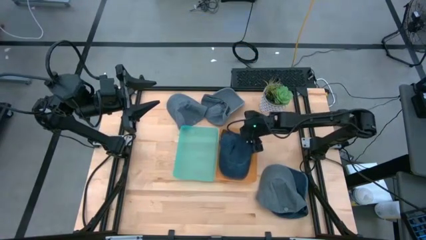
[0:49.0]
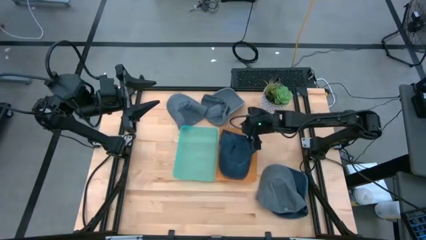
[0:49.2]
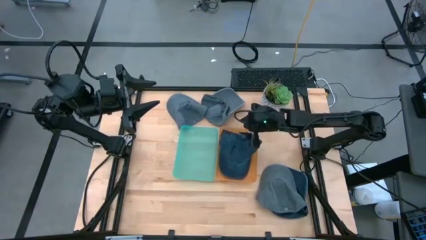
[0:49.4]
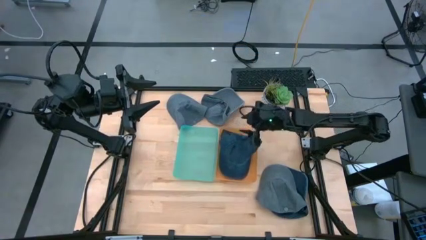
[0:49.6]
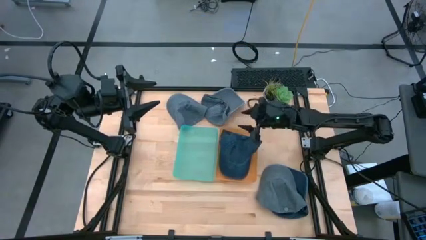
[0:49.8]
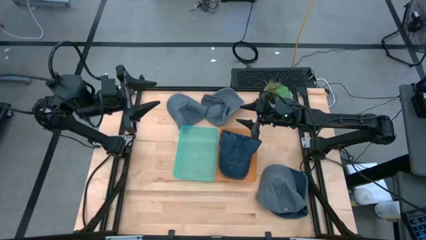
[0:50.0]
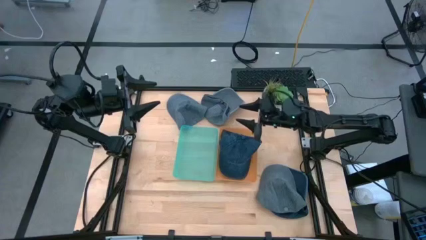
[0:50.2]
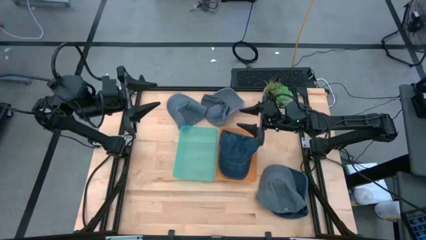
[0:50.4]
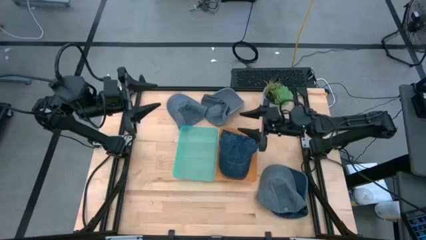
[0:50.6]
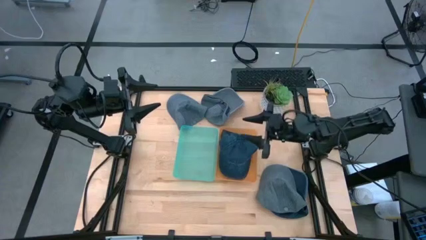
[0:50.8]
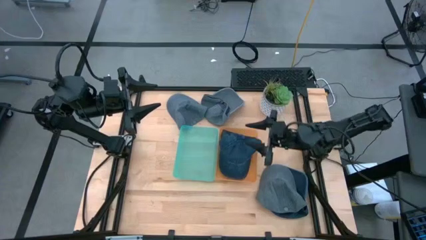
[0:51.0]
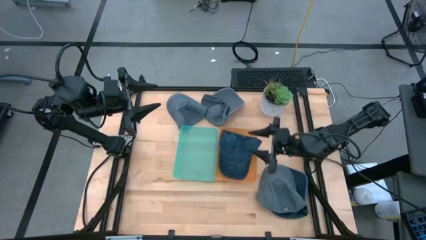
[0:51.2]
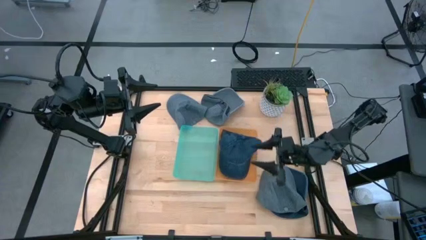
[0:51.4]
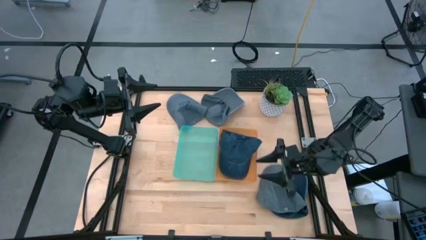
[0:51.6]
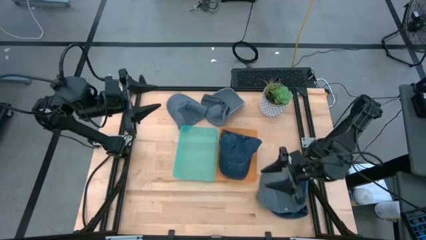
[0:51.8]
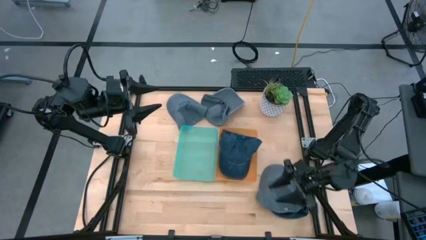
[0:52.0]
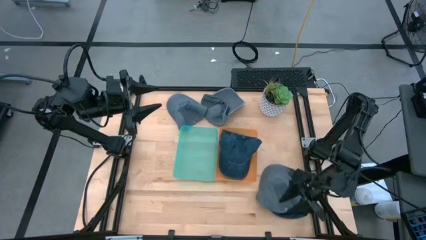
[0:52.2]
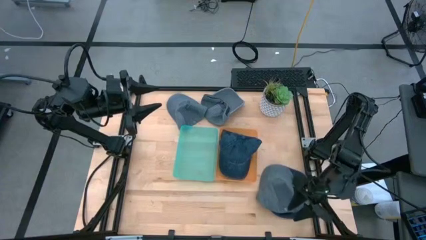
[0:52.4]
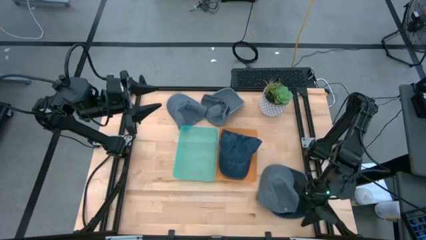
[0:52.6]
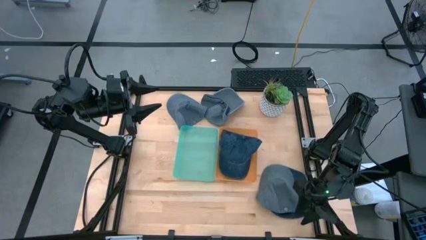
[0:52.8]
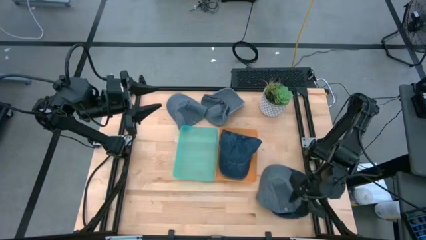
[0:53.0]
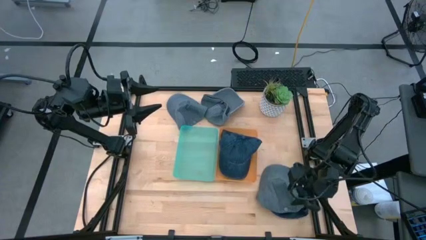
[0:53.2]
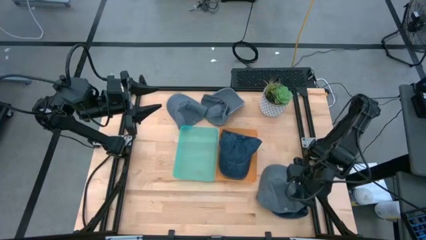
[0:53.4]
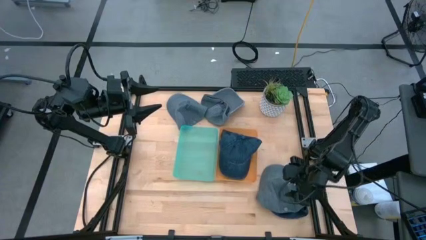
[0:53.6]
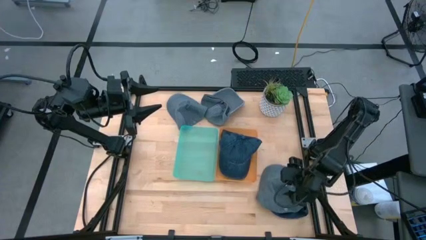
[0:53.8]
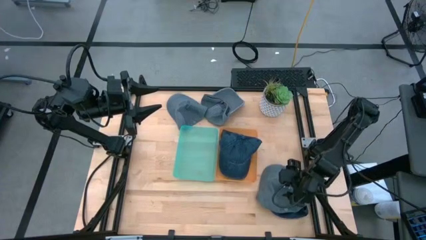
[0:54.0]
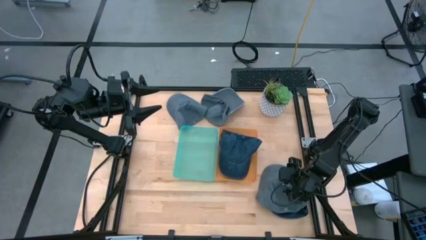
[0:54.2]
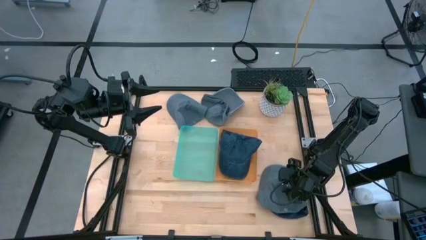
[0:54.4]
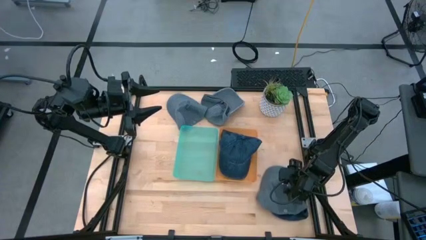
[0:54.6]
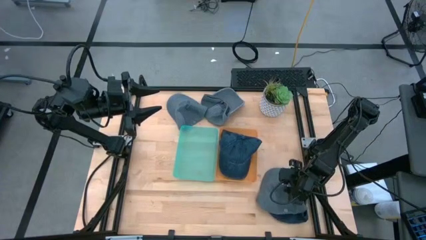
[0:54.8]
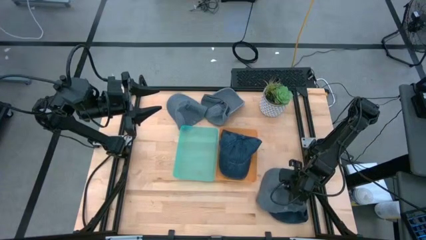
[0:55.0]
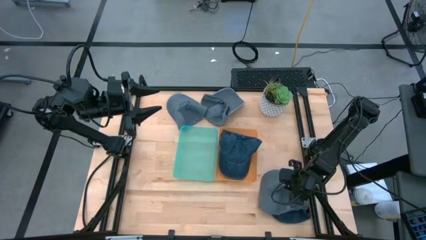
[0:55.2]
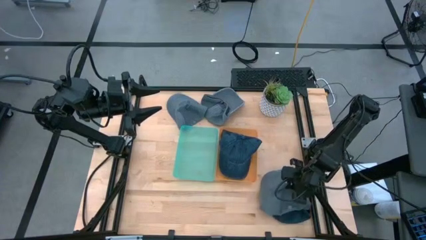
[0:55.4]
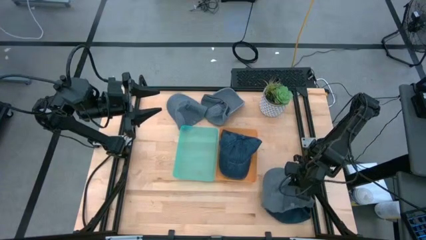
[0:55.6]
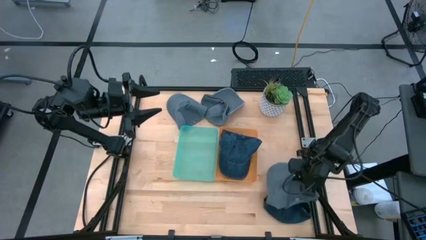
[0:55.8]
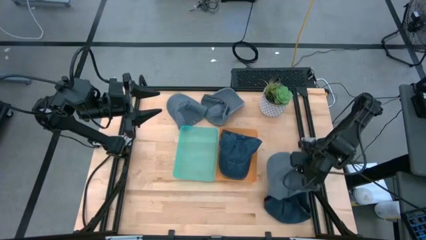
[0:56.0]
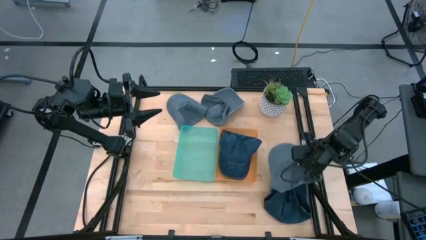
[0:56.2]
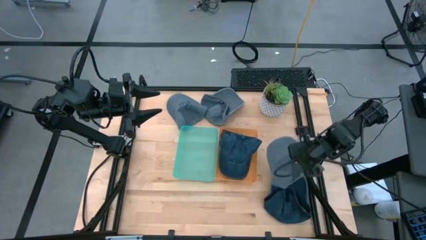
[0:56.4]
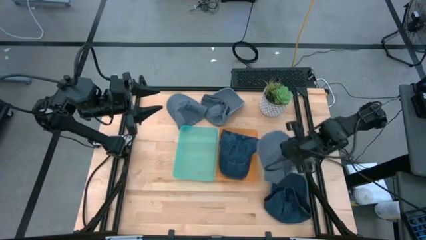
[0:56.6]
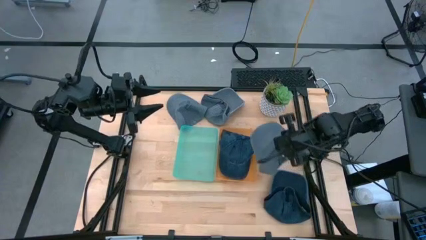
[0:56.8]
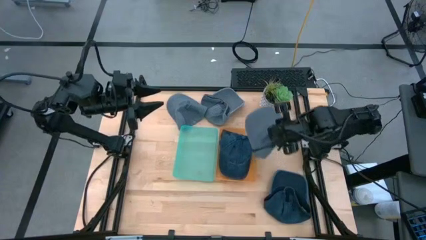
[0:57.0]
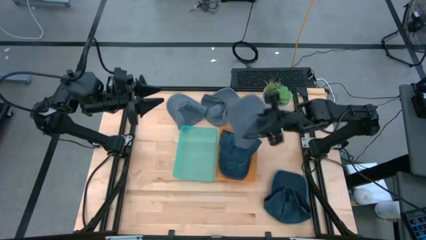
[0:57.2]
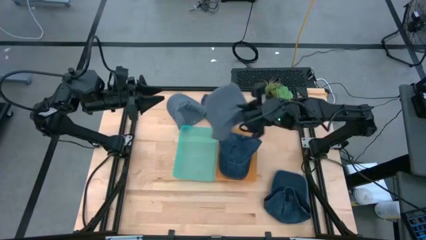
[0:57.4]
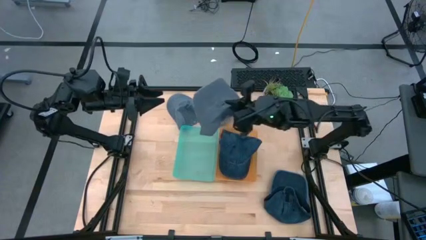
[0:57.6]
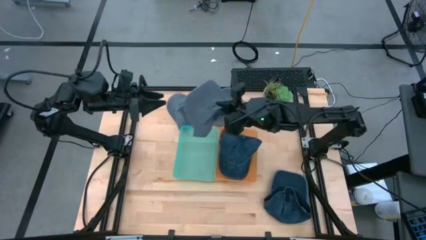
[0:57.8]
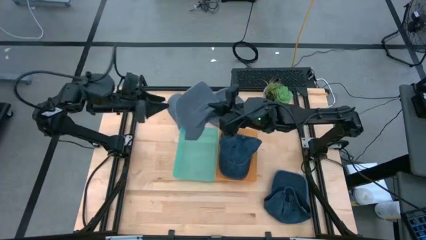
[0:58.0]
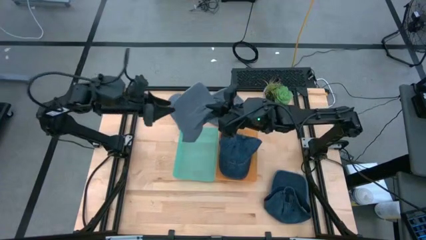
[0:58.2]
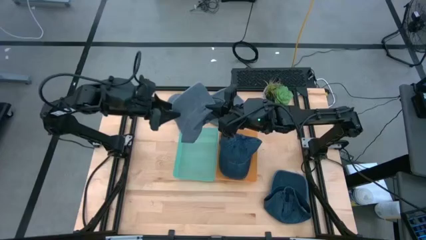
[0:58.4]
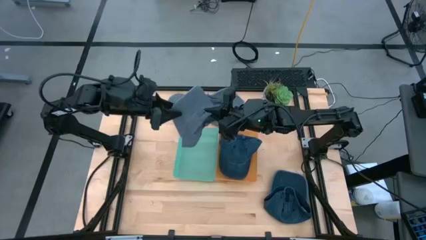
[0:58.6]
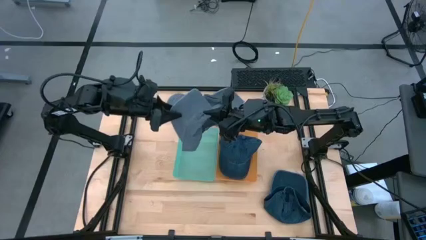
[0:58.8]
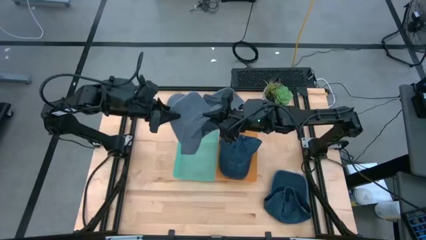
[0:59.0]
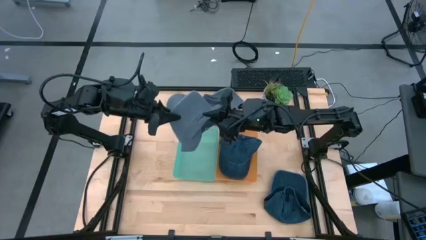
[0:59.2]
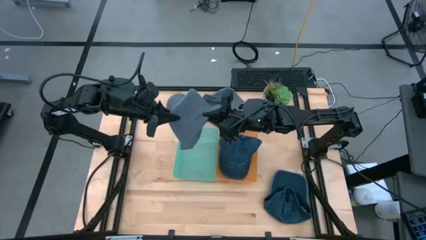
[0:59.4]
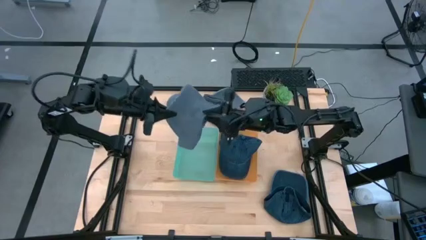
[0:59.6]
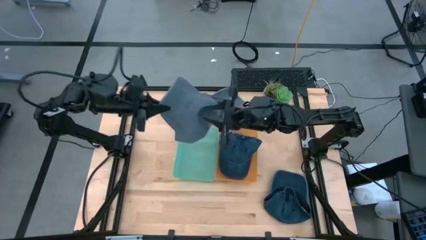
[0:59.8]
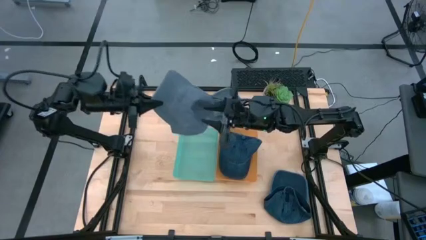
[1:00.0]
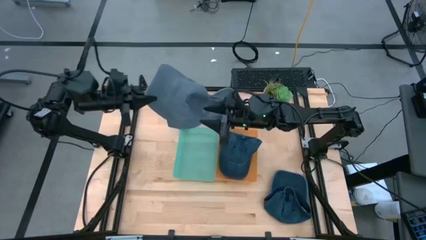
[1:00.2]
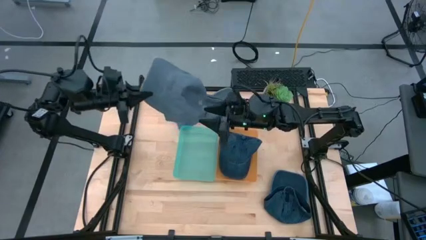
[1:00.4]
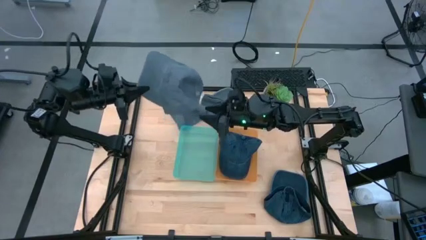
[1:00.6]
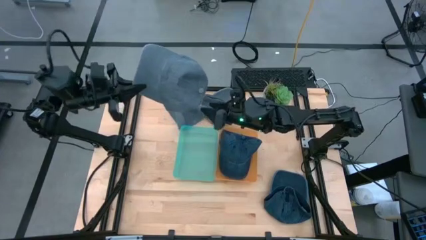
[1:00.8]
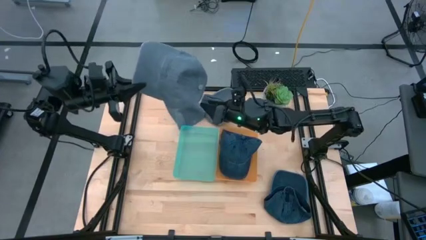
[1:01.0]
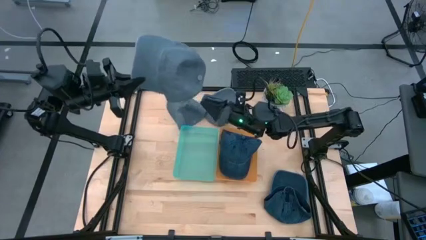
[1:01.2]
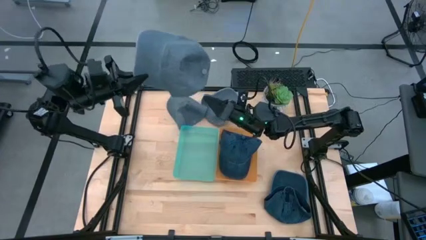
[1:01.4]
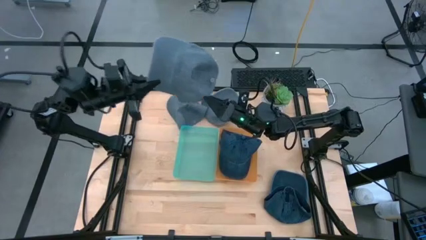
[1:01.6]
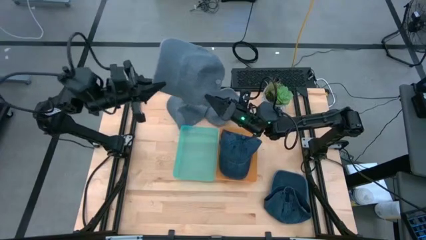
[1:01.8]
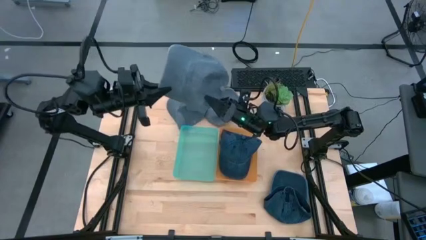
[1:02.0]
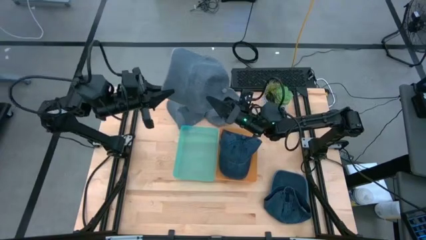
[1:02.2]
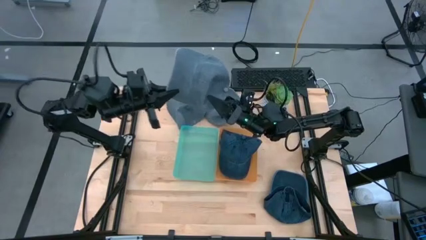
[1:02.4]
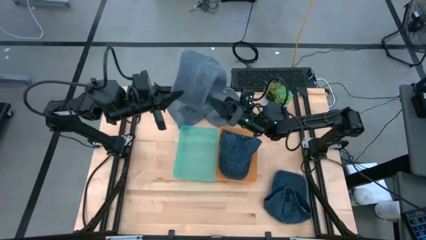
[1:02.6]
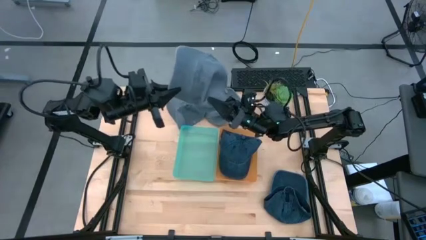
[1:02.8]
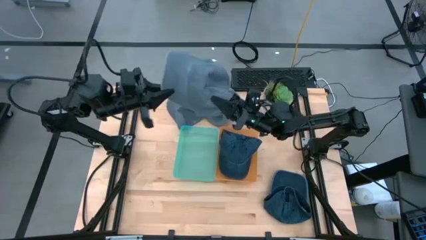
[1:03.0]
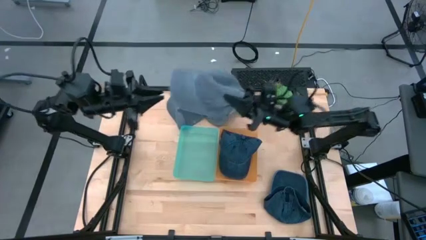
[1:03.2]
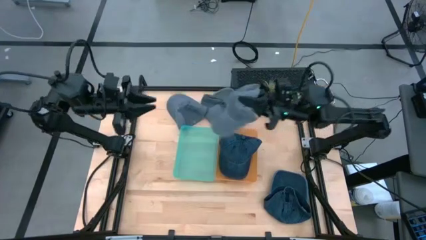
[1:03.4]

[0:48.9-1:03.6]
Task: Pick & Place hat
Put the bottom gray cap into the blue bin

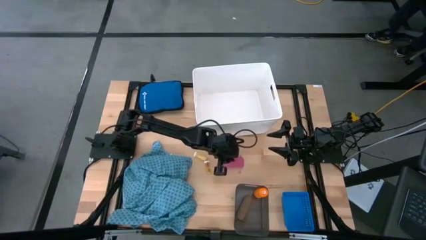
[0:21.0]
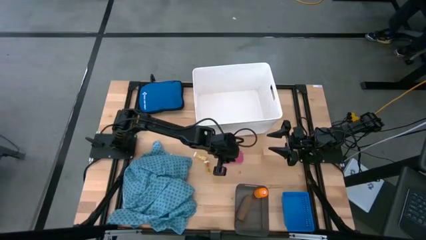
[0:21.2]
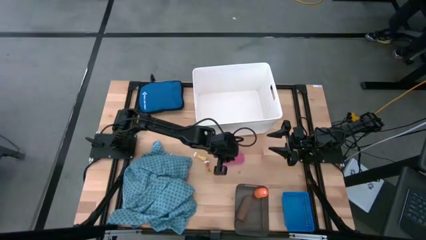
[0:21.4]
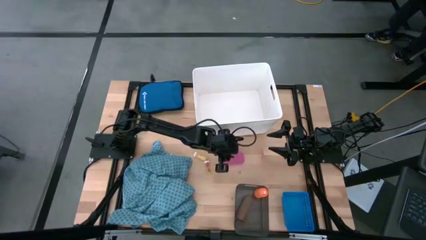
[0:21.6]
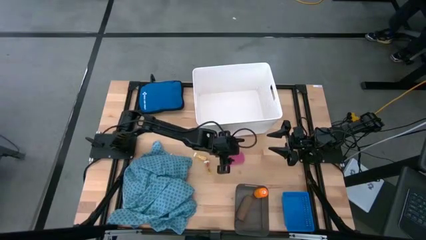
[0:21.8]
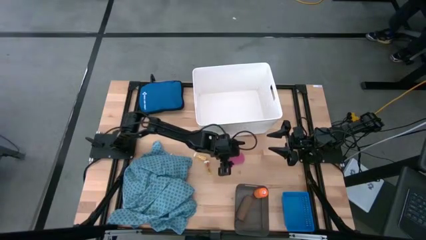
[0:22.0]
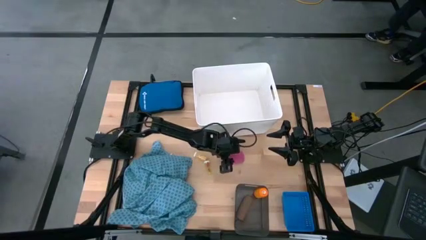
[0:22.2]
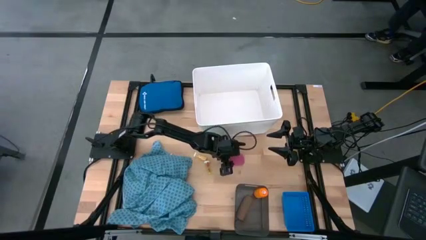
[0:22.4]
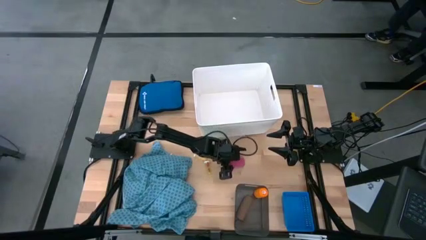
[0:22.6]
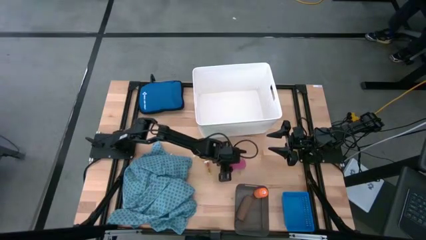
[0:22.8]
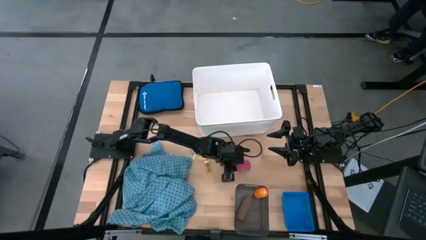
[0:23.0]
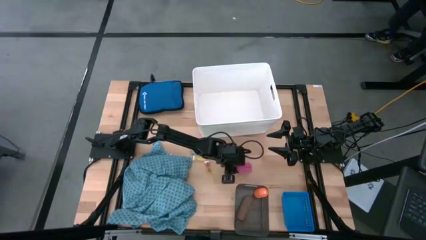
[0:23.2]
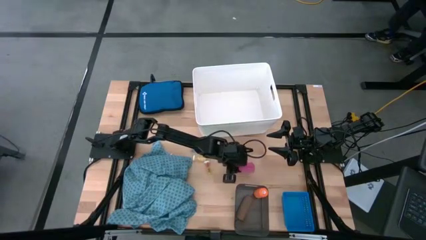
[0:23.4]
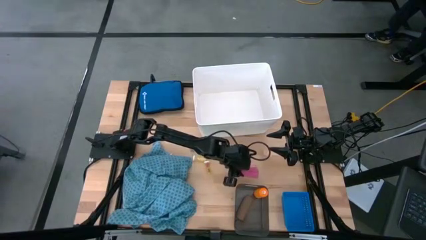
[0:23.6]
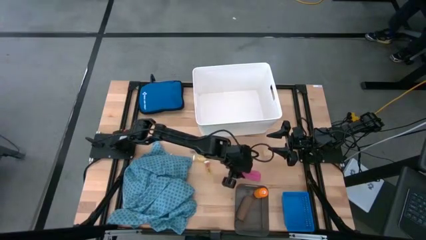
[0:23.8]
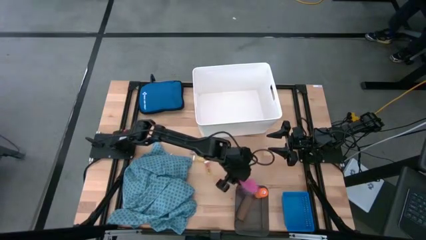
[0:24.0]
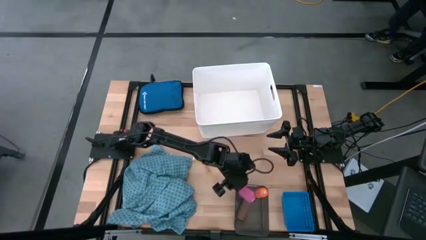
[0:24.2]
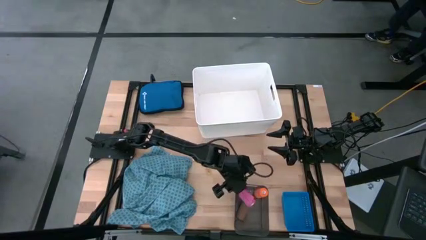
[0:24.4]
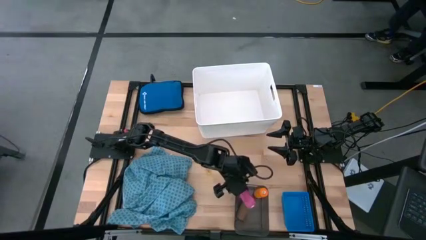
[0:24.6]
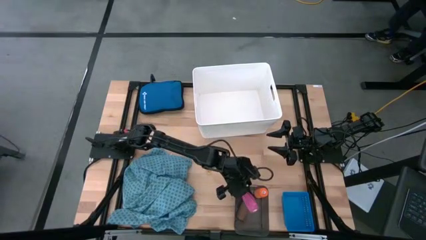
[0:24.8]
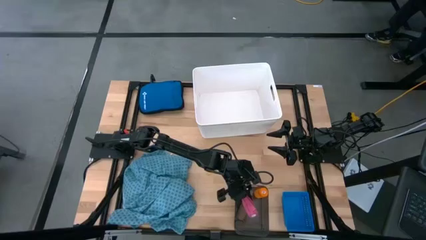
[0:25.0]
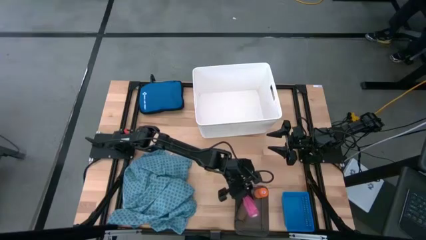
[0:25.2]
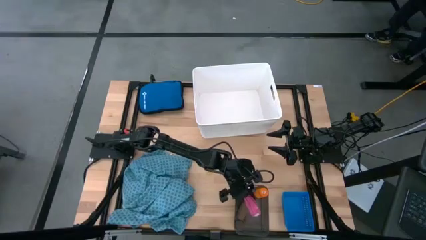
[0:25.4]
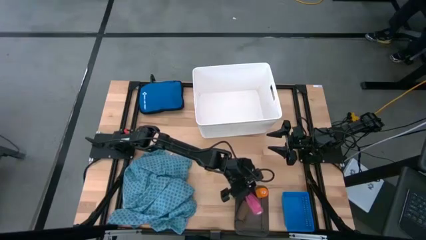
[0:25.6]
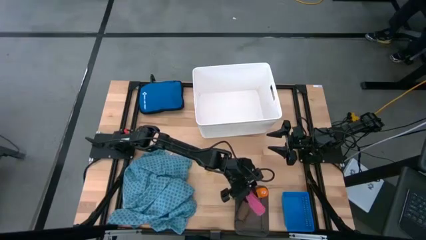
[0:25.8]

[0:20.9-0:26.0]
Task: Pick & place medical supplies in basket/bin
Put the pink bandage into the black bin
